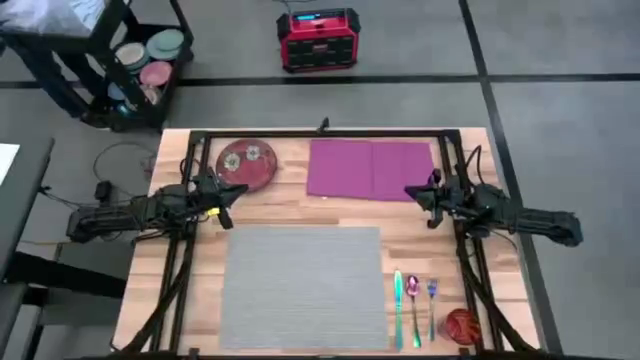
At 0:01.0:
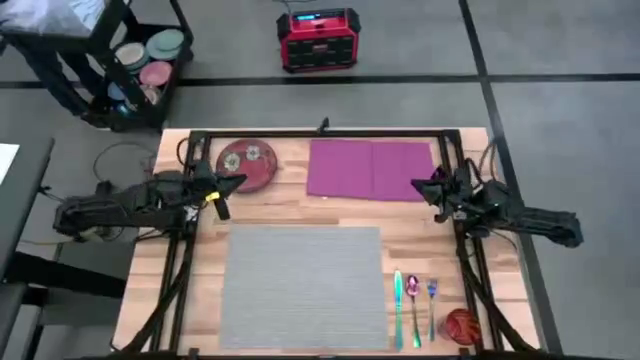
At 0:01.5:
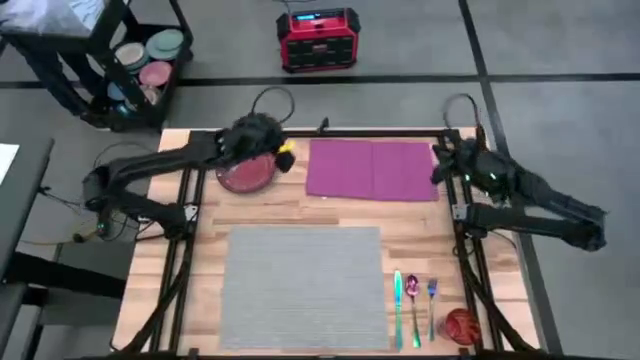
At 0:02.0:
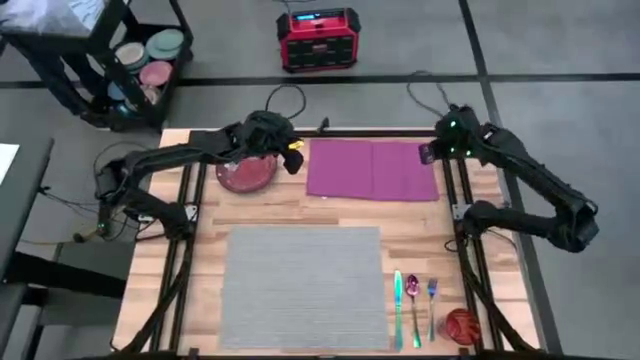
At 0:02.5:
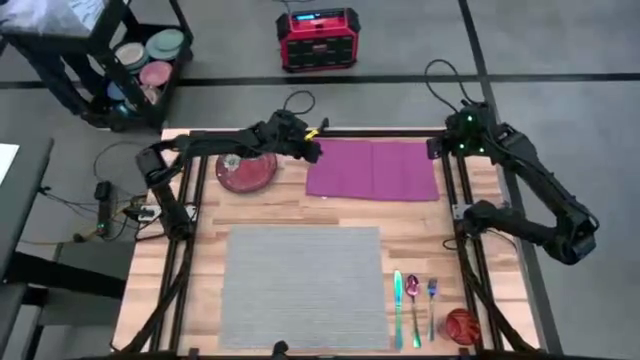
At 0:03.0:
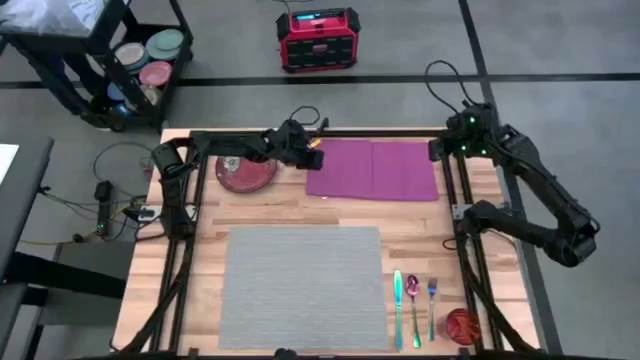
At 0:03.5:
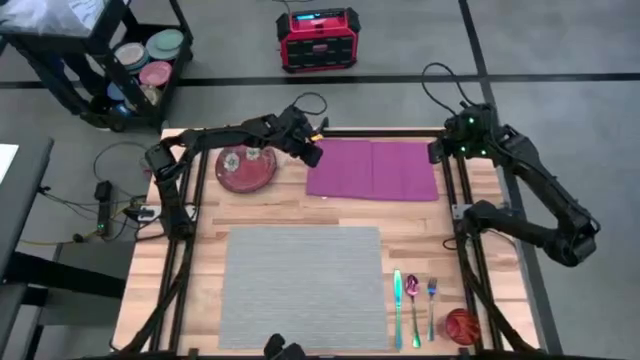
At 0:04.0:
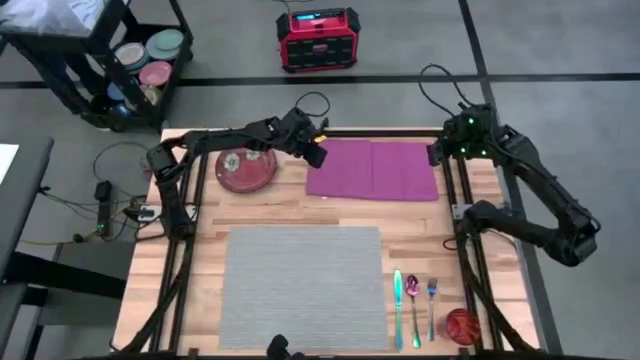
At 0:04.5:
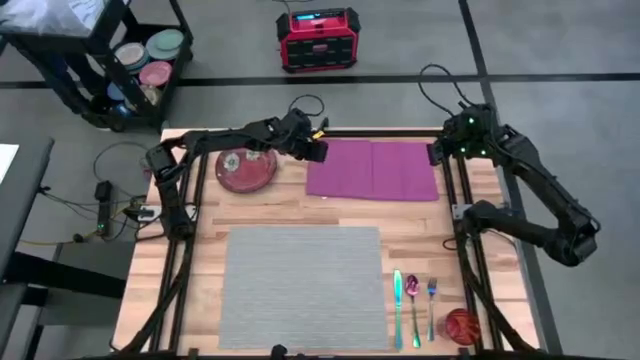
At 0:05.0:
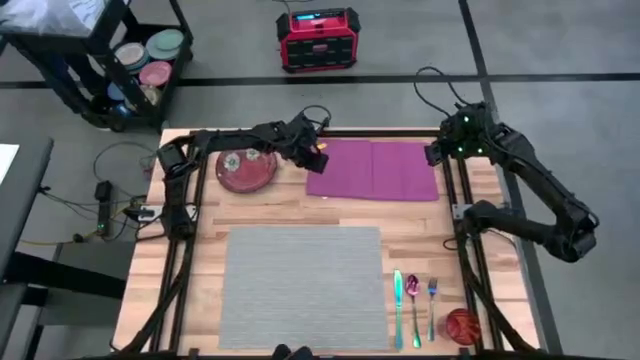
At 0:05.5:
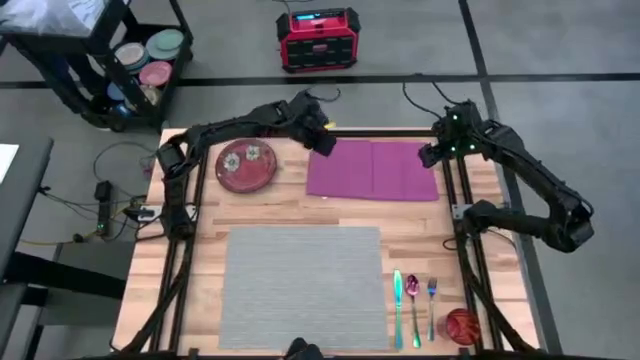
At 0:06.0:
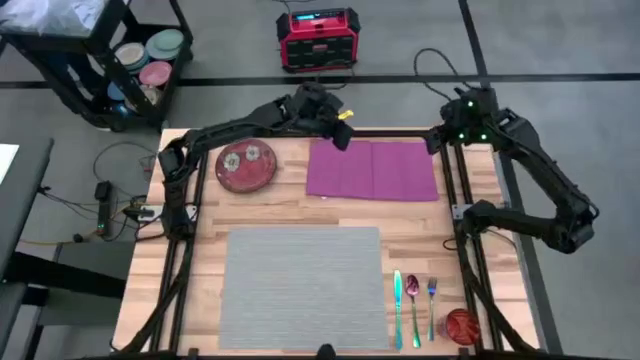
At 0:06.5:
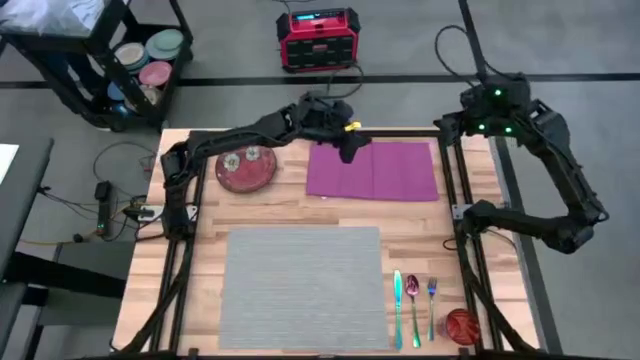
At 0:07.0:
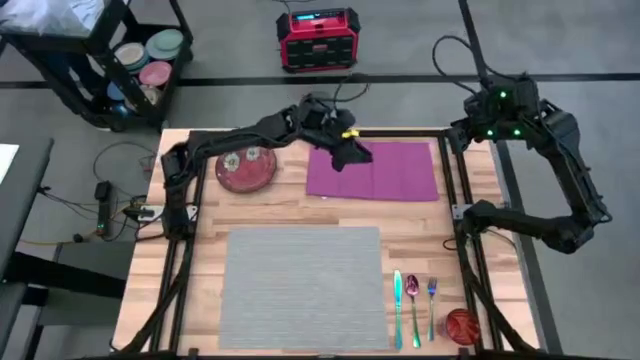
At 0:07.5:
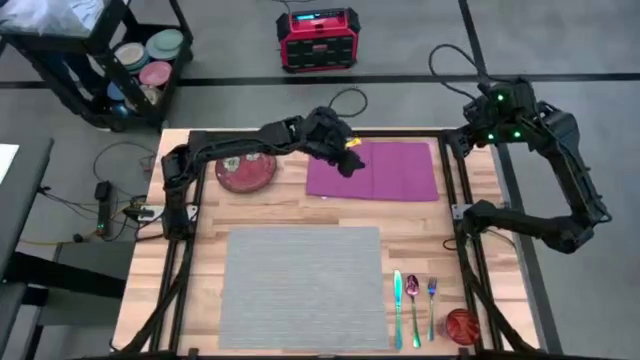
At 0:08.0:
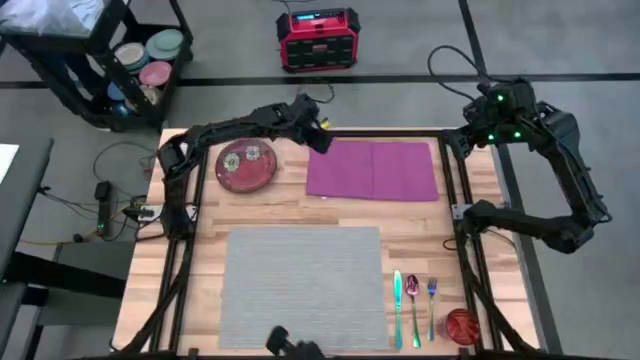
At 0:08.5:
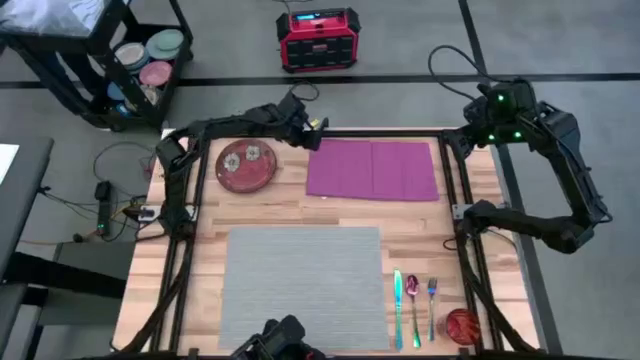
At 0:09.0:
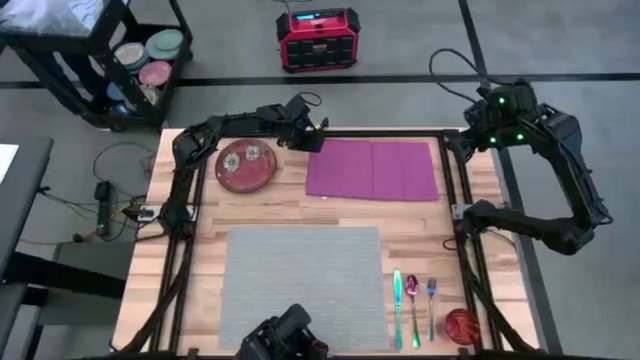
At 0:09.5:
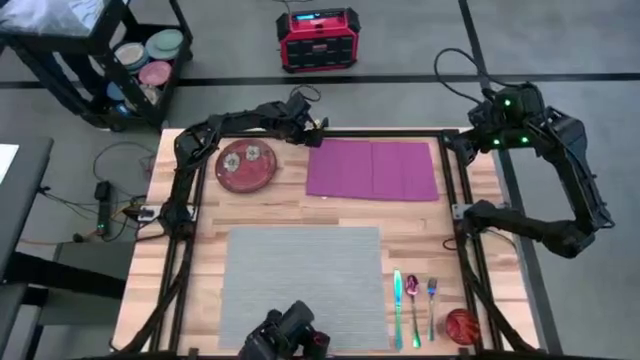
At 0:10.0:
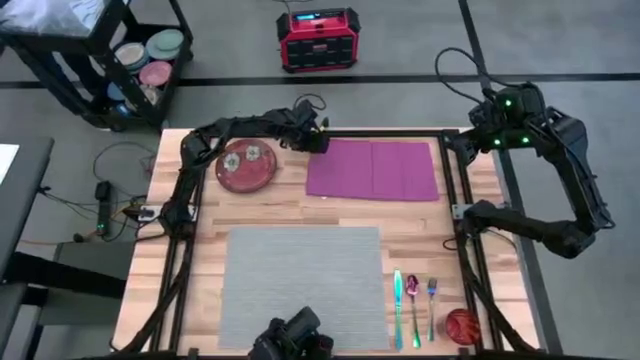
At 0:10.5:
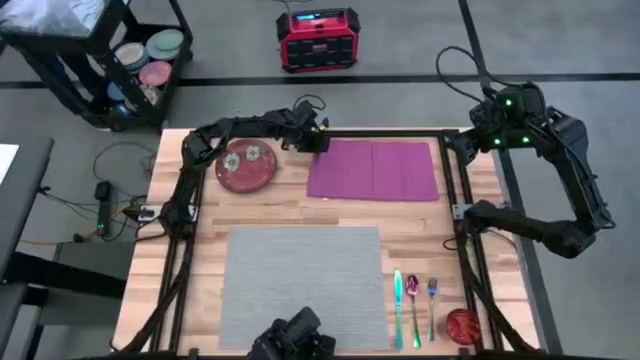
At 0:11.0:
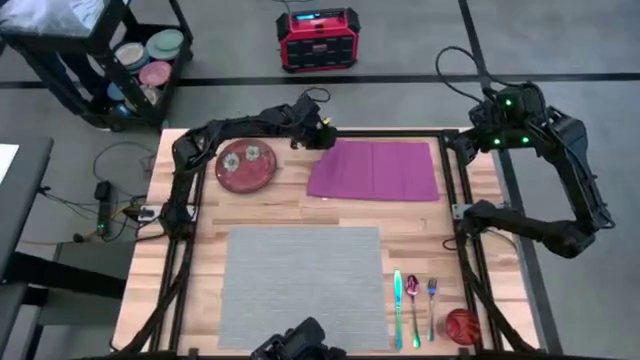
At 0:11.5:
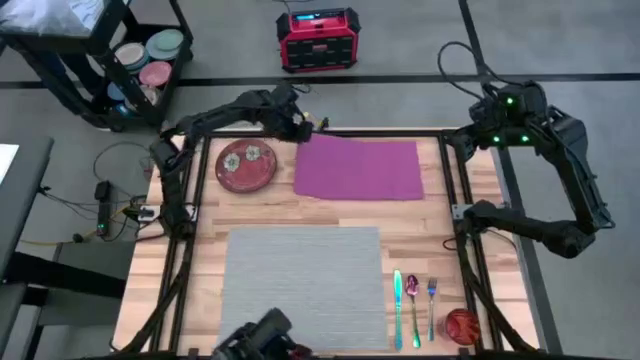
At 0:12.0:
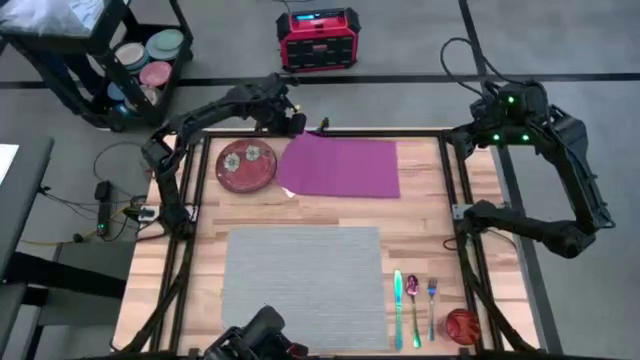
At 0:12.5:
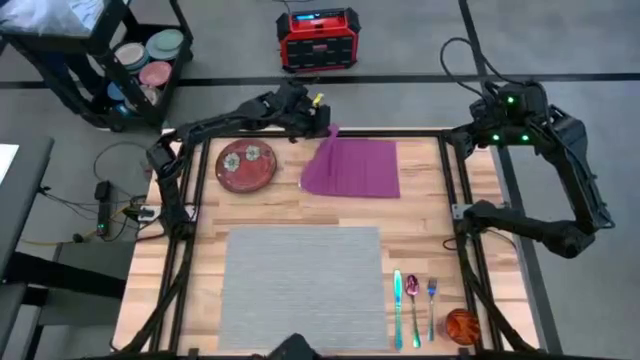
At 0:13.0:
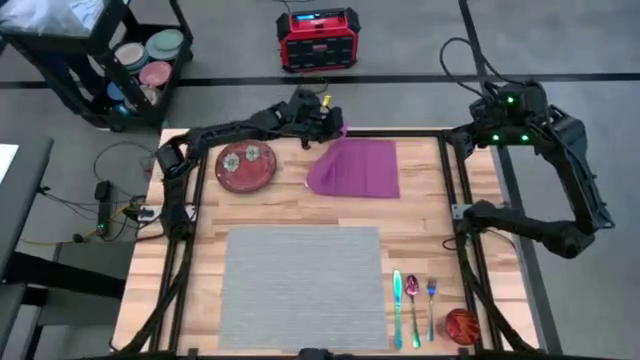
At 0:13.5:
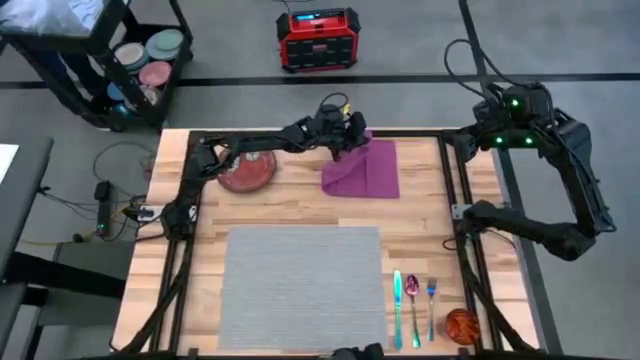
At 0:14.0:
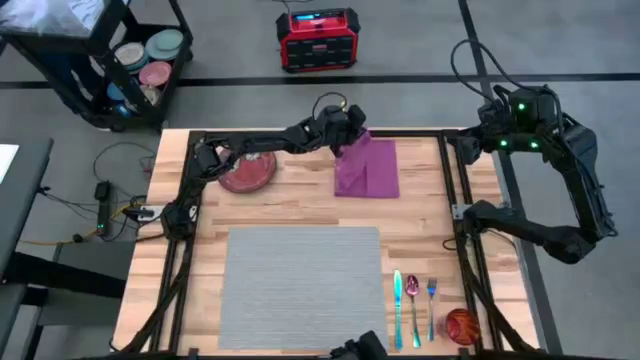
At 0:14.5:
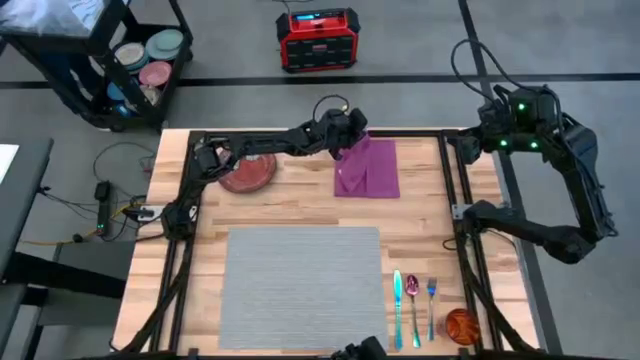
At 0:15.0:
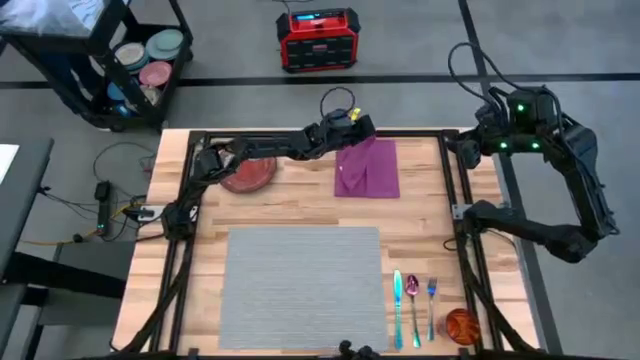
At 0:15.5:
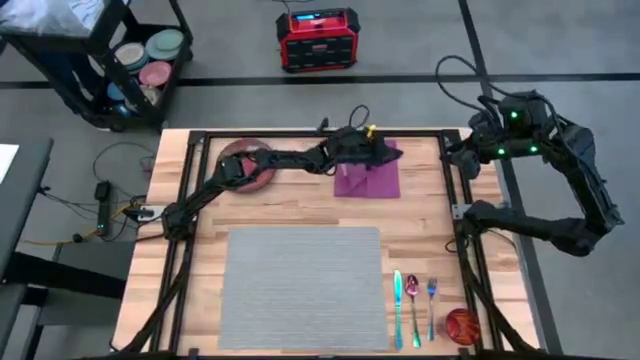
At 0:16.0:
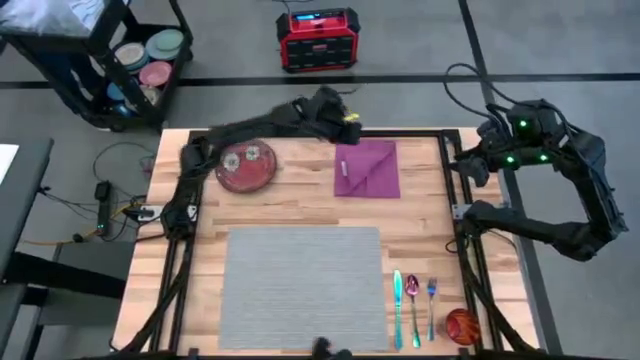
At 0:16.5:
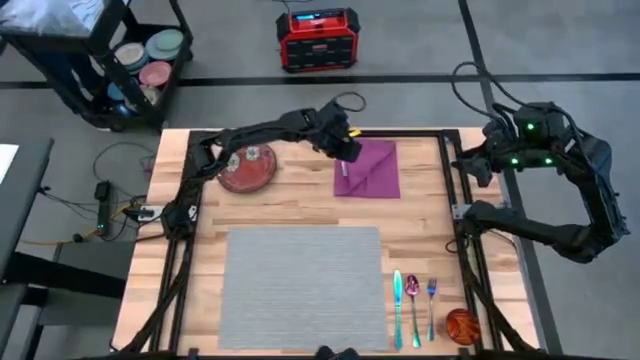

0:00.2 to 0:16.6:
Task: Set table place
Fold the pink table towel
